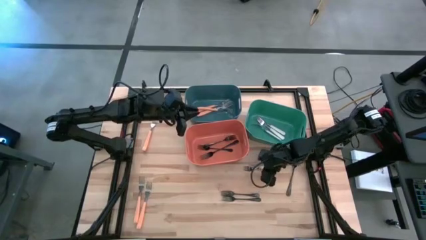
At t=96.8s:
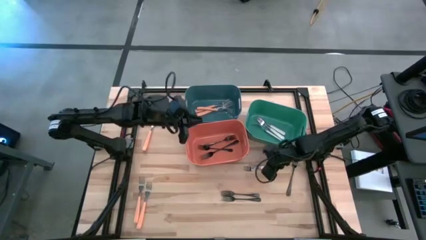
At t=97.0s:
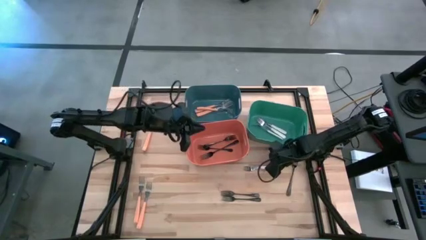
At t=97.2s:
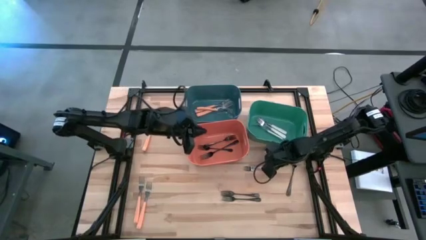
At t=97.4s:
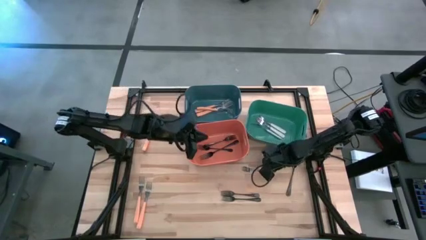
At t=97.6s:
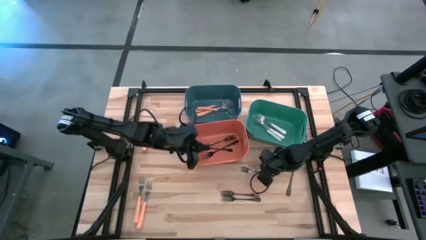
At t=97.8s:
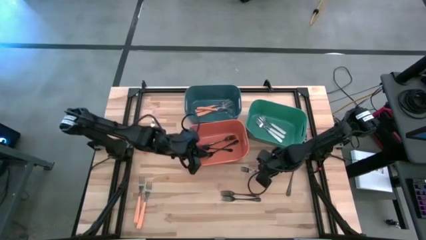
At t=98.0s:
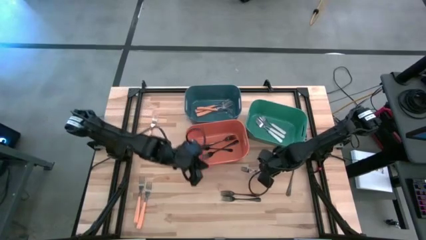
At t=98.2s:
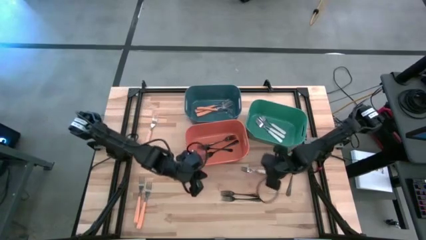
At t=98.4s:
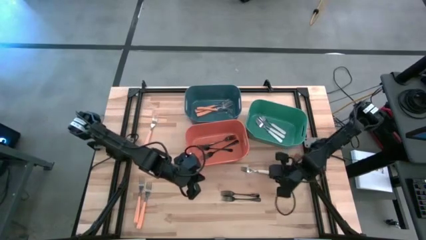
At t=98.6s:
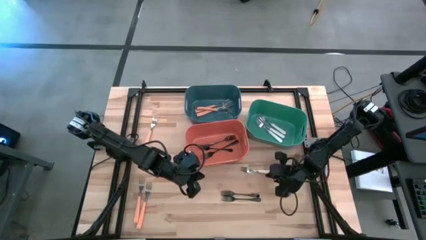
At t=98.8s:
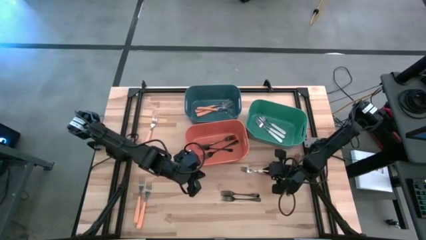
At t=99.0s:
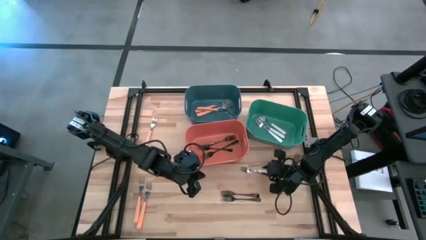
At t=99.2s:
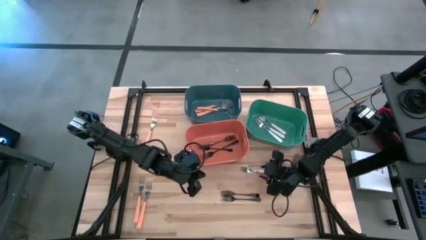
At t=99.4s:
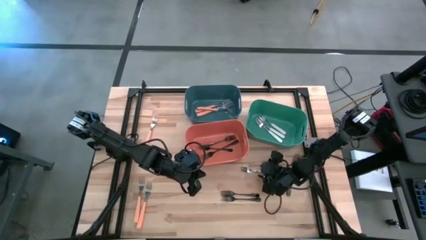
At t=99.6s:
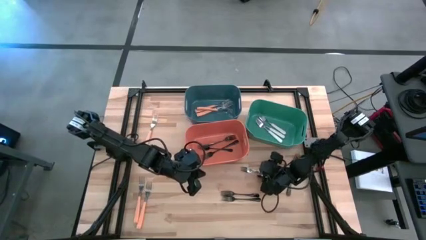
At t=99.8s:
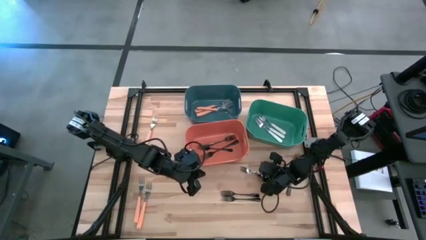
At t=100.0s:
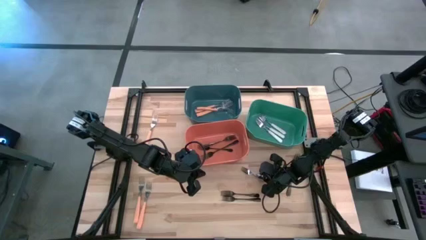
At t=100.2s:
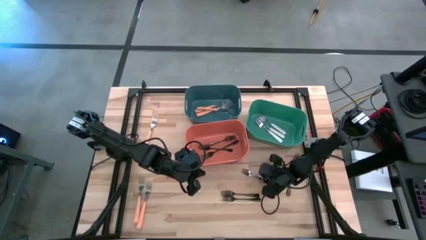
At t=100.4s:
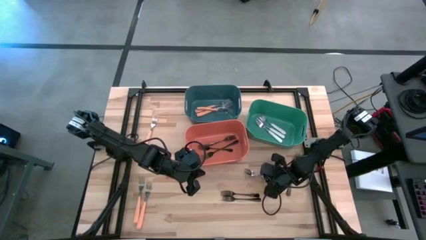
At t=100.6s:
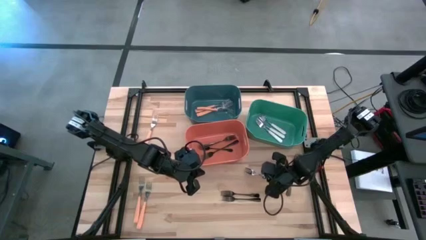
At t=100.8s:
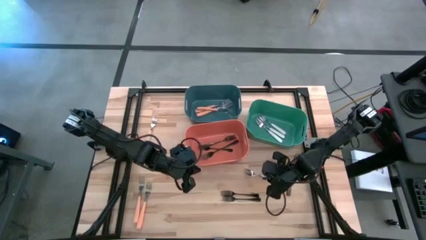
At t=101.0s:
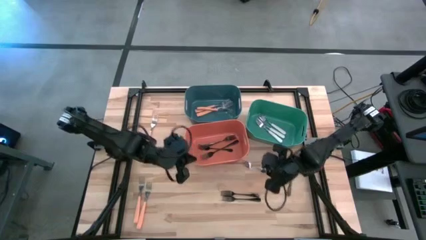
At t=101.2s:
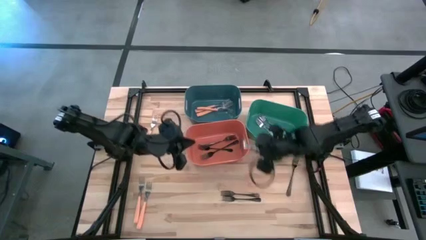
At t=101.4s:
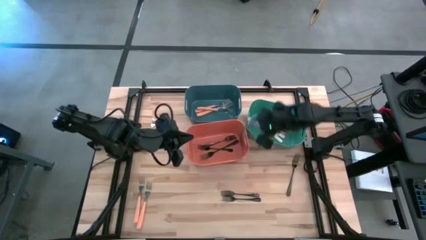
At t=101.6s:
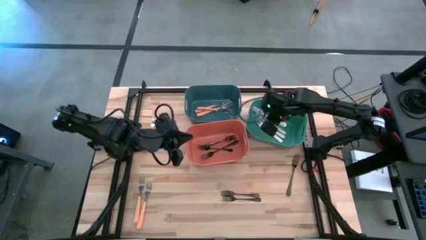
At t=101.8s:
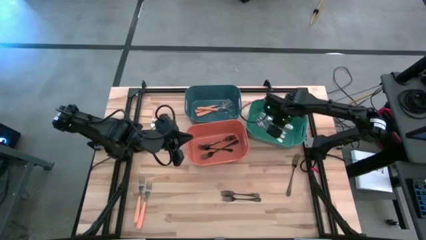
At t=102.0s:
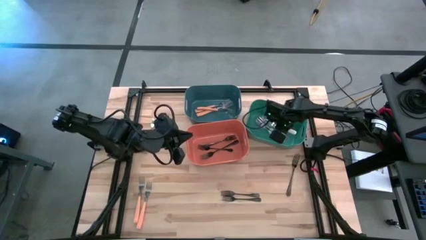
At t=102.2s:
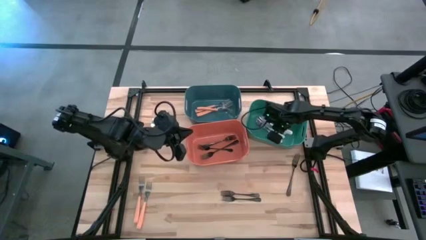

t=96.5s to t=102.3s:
Task: Sort silverware by color (type)
Put the white fork into the green bin

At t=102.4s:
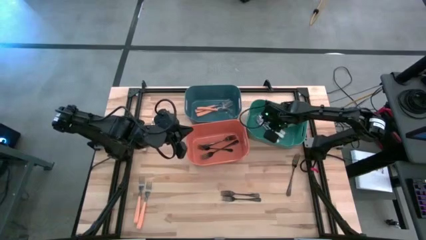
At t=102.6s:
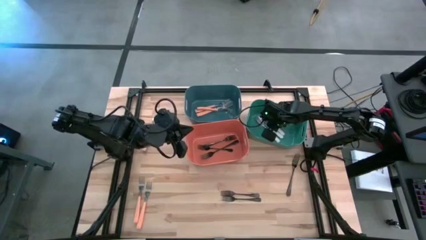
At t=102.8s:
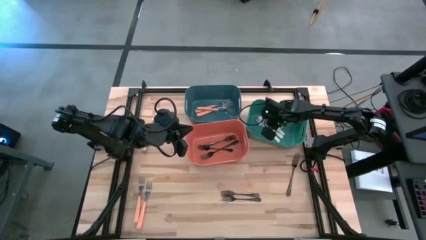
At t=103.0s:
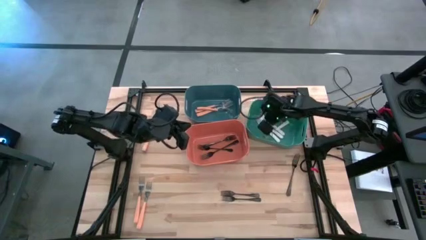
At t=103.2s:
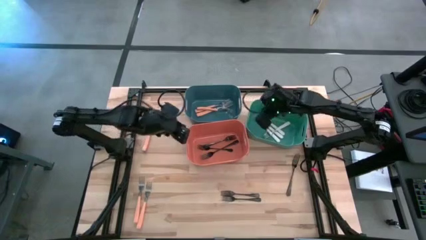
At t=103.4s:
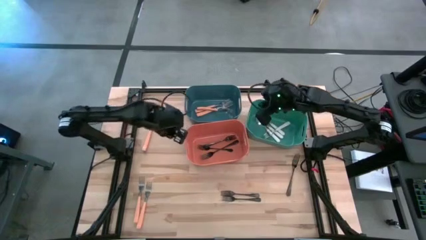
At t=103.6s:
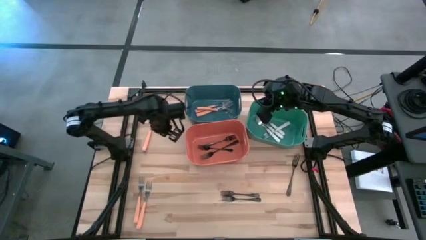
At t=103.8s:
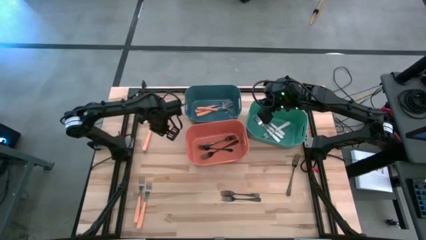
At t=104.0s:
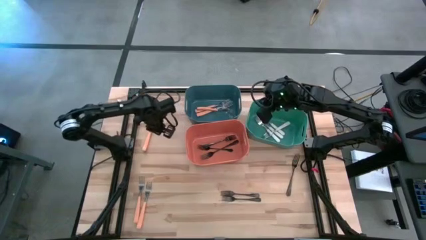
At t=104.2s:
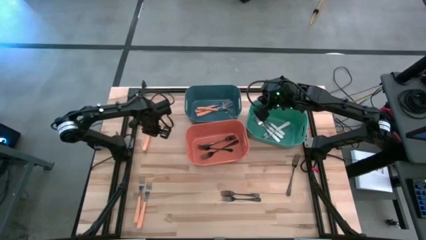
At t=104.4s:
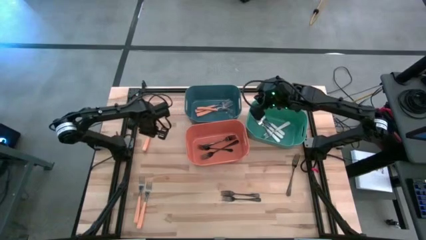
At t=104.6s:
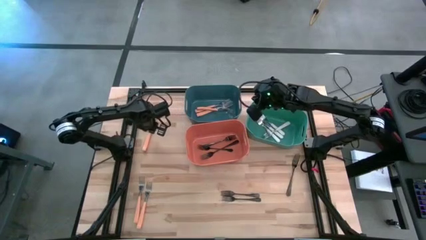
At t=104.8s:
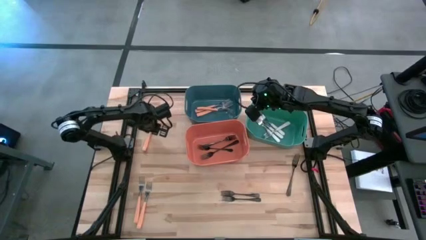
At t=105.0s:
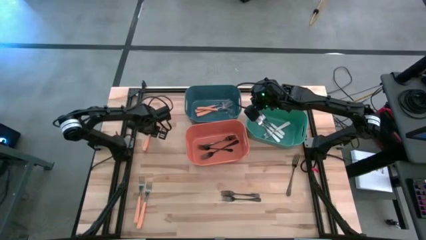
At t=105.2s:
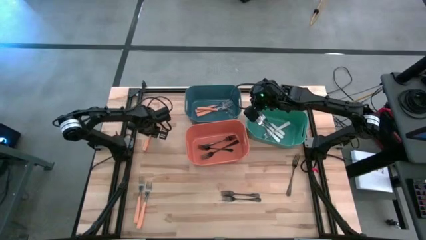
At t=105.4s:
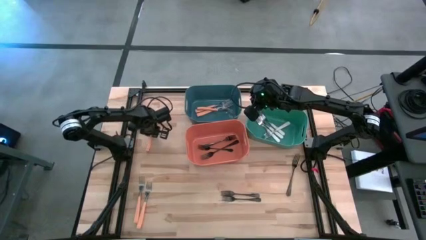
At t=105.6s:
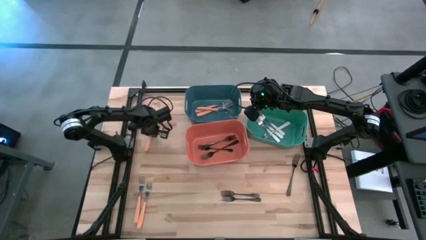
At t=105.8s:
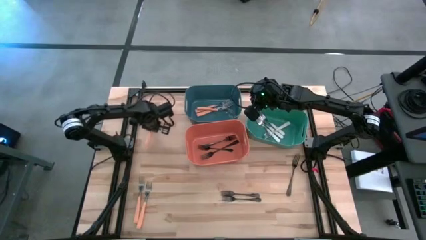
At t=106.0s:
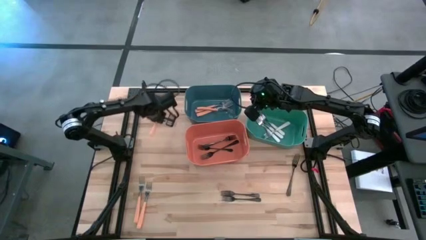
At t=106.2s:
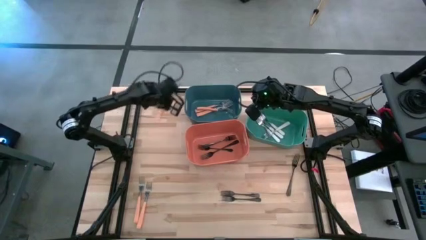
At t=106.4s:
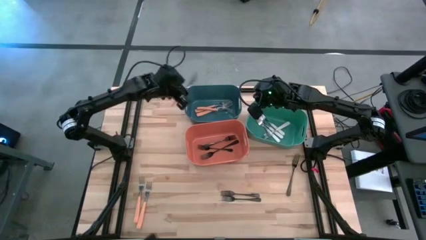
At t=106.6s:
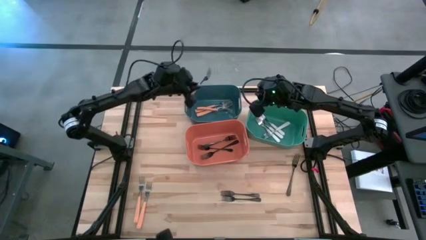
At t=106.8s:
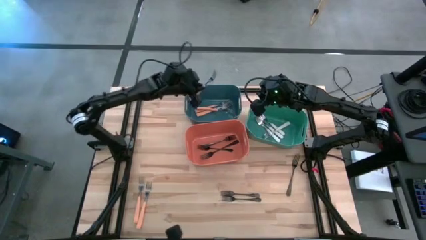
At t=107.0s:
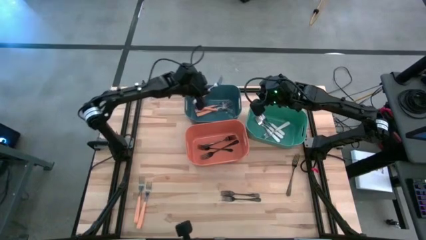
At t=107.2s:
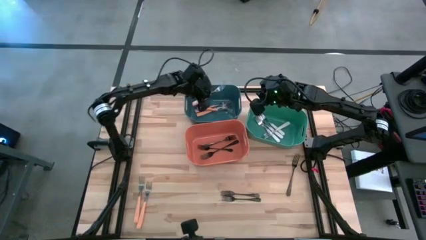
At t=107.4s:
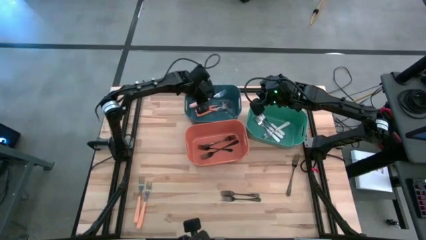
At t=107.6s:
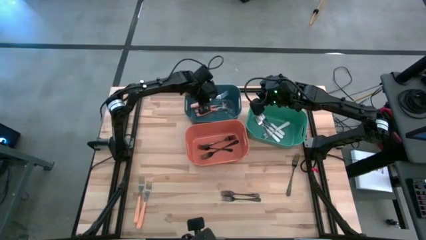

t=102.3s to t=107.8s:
Put the orange fork into the blue bin
